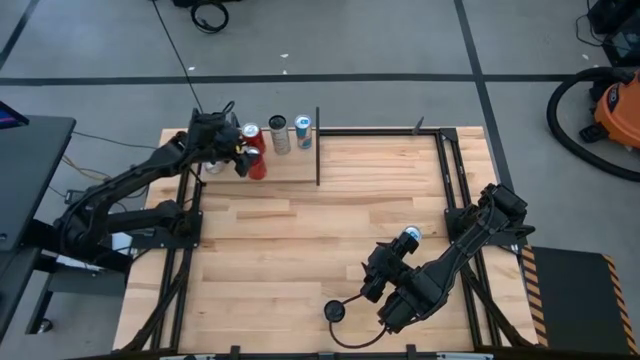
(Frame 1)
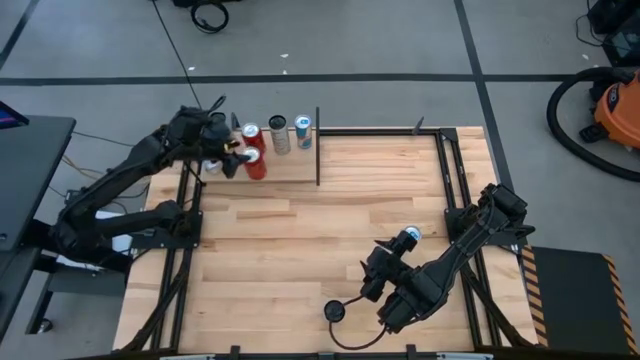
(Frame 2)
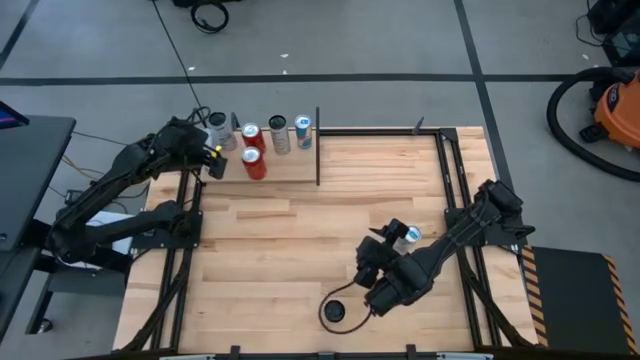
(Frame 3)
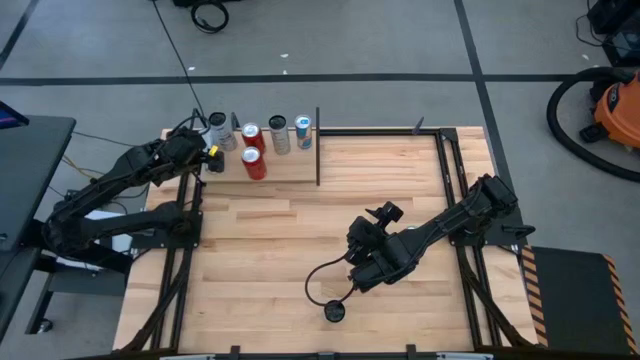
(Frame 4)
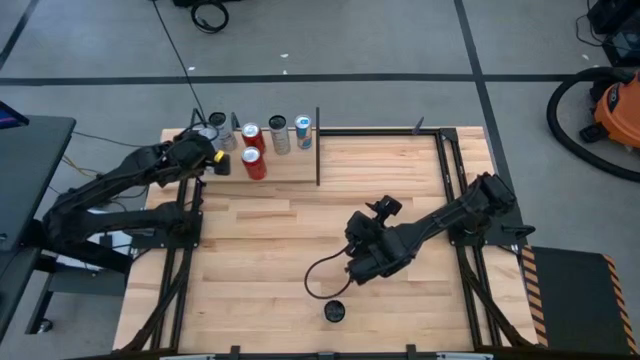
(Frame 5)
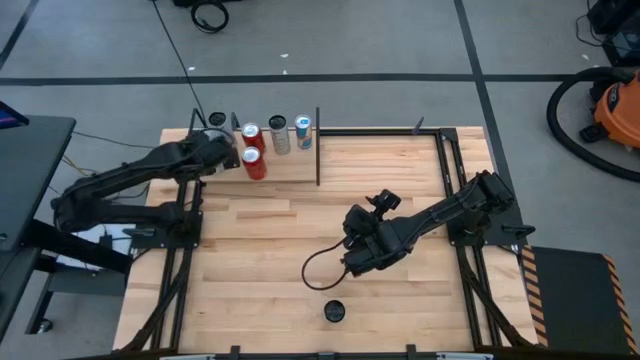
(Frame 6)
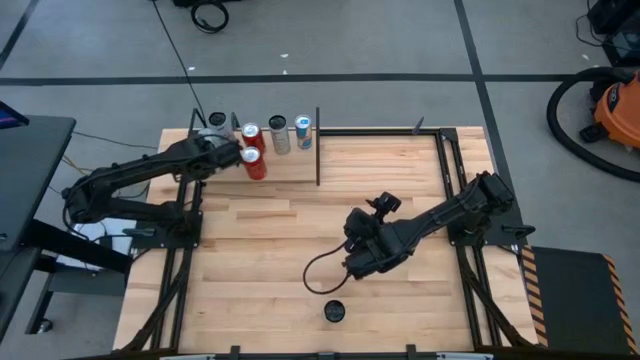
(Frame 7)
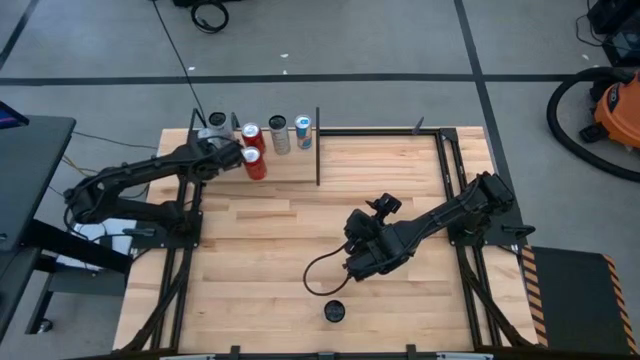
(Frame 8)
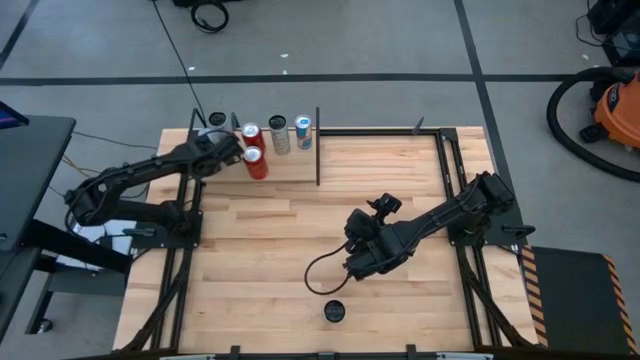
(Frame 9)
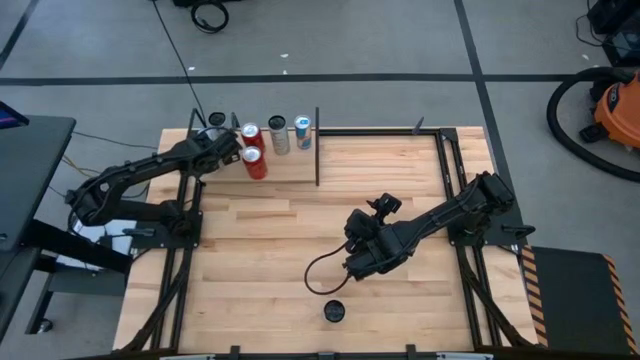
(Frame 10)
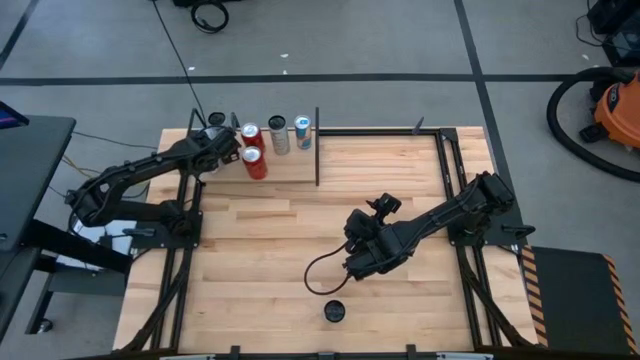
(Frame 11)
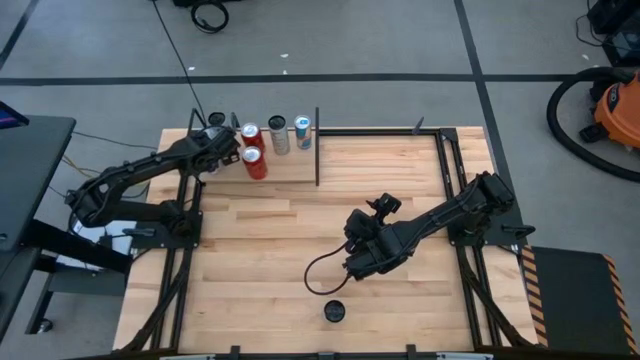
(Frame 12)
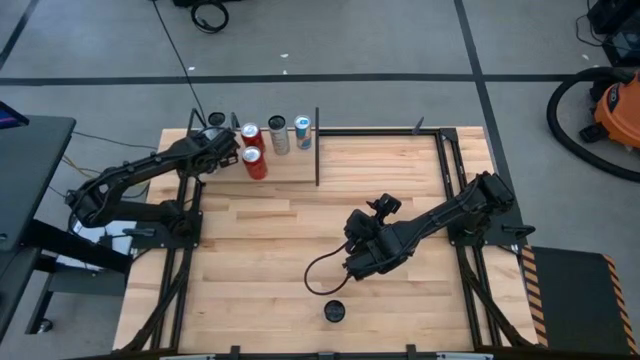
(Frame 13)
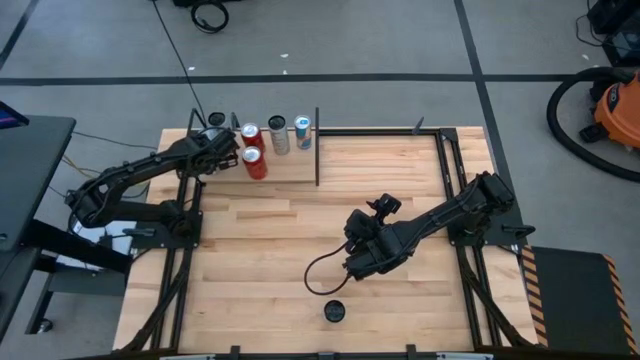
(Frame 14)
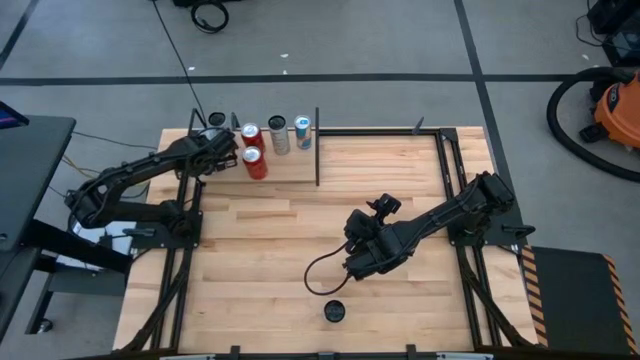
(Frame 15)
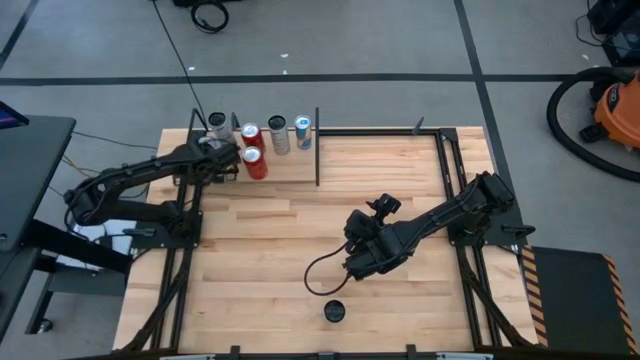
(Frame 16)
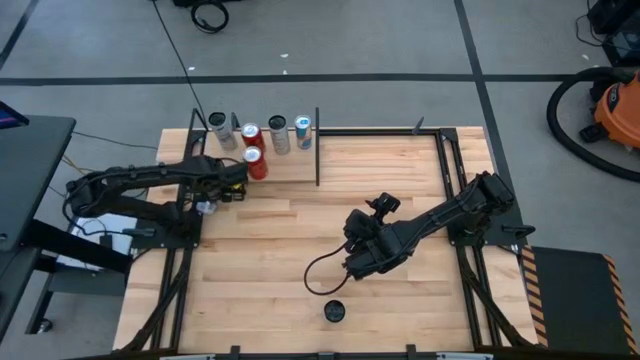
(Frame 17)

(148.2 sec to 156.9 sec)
Task: Place canned beverage on shelf
Adjust the blue-white soda can

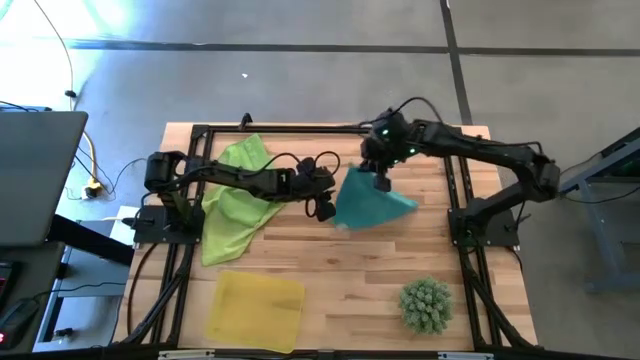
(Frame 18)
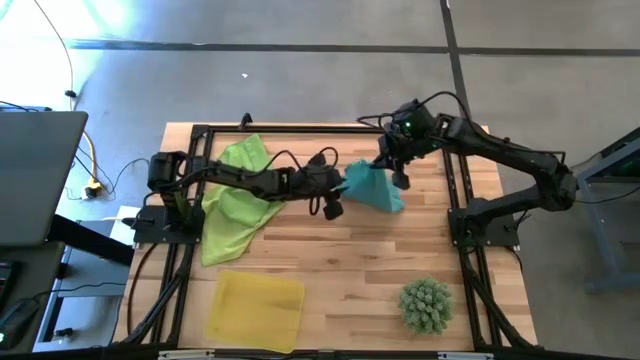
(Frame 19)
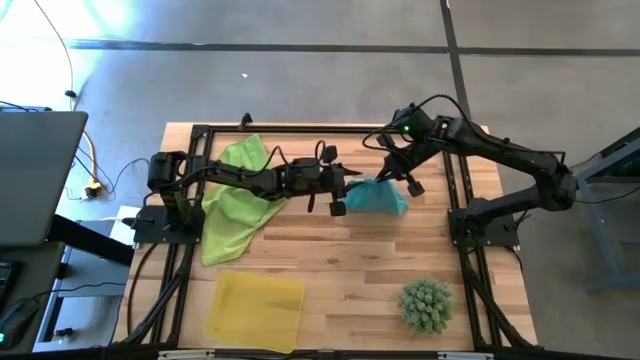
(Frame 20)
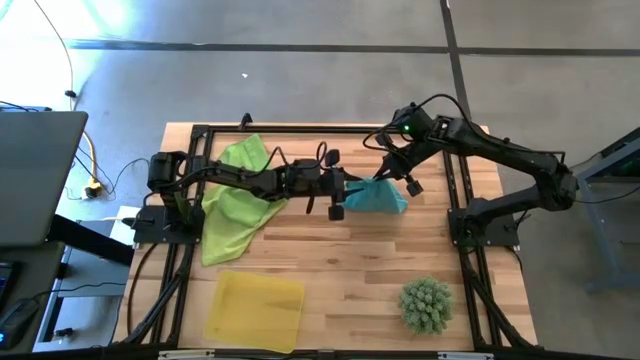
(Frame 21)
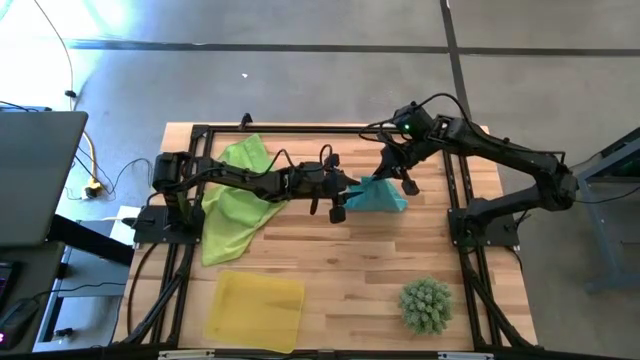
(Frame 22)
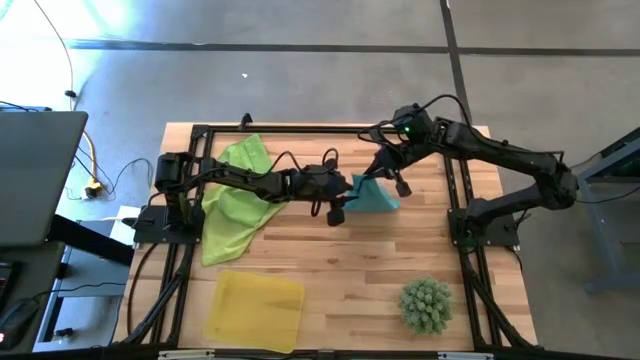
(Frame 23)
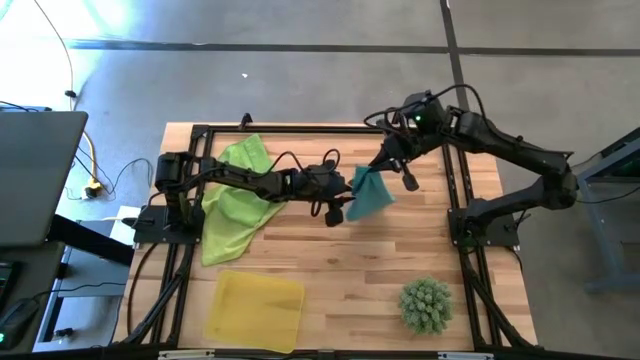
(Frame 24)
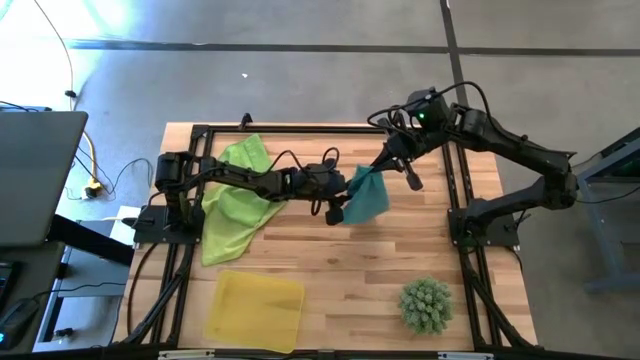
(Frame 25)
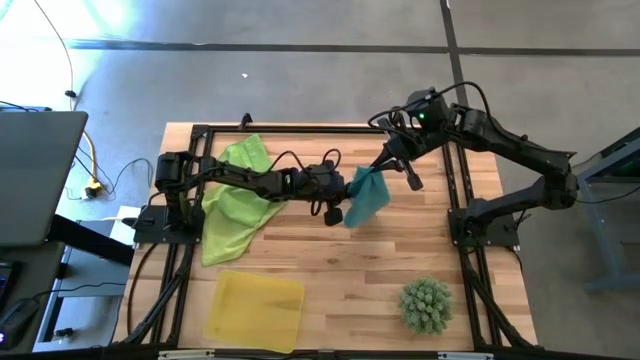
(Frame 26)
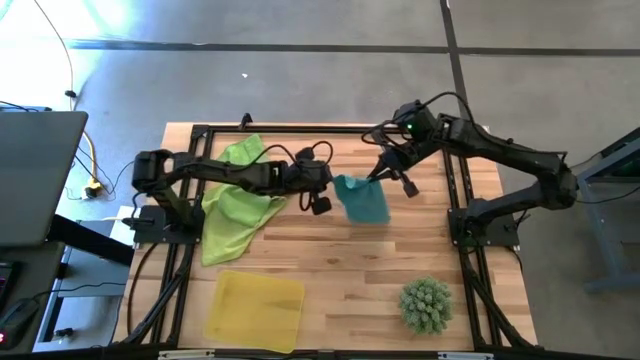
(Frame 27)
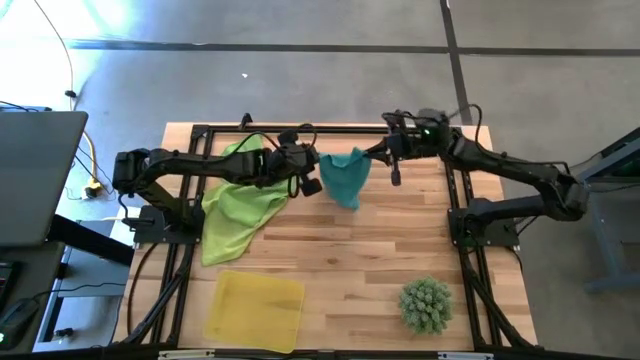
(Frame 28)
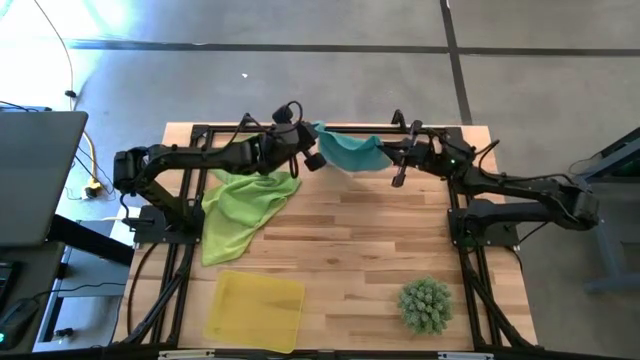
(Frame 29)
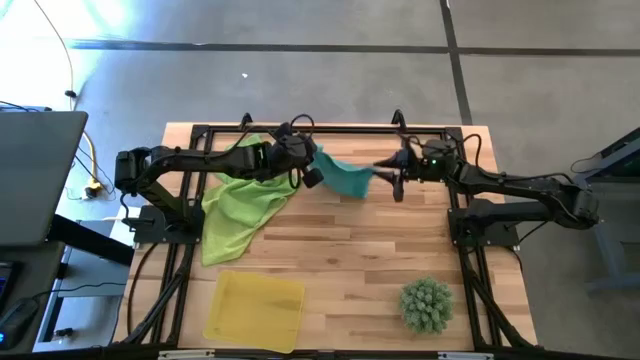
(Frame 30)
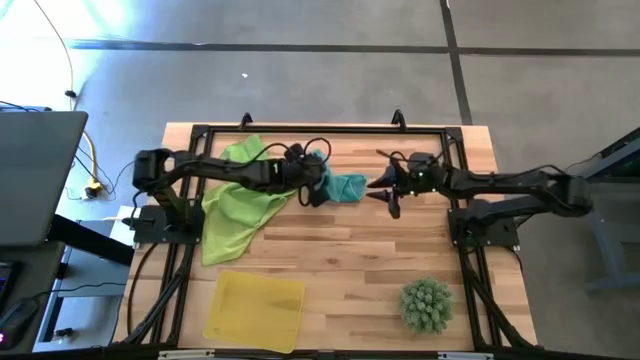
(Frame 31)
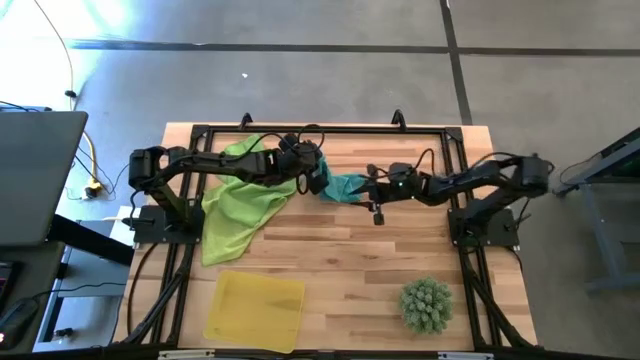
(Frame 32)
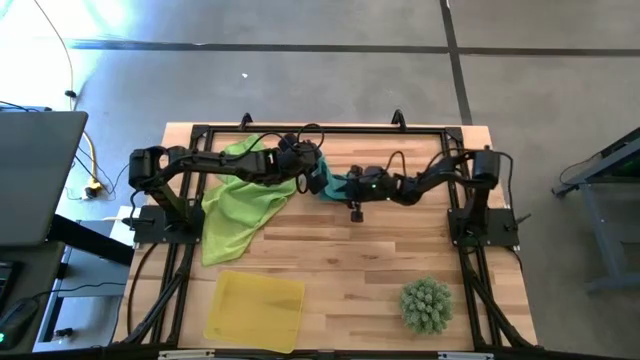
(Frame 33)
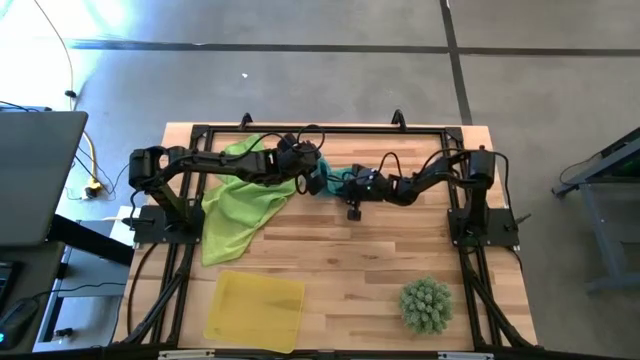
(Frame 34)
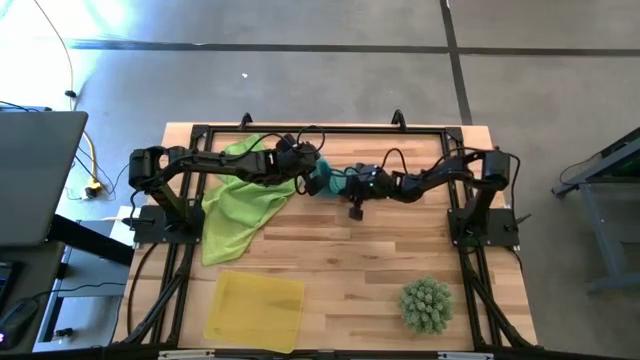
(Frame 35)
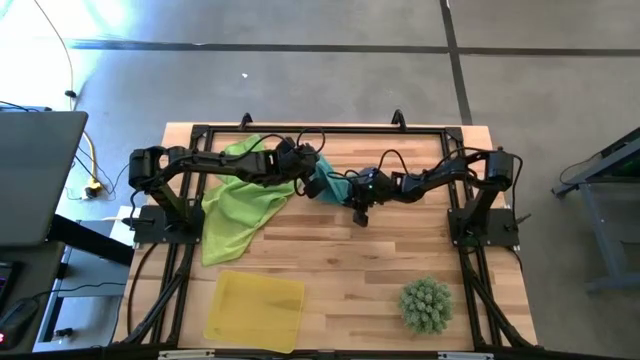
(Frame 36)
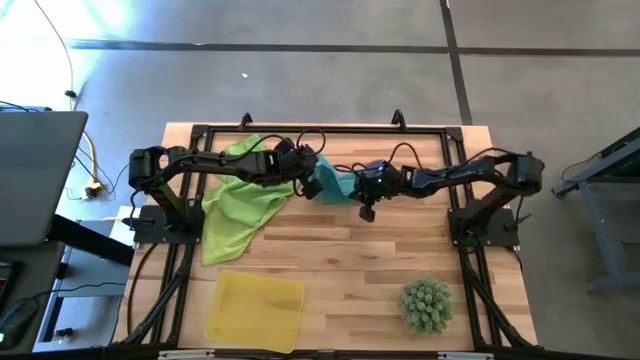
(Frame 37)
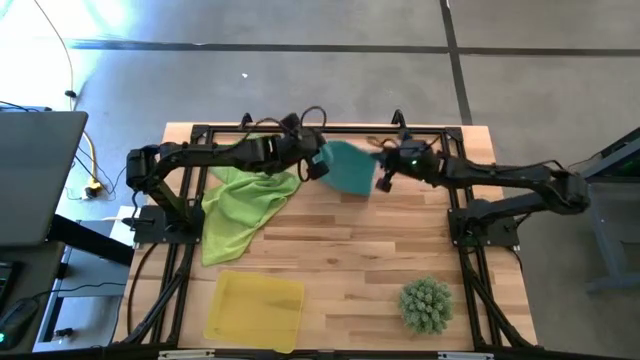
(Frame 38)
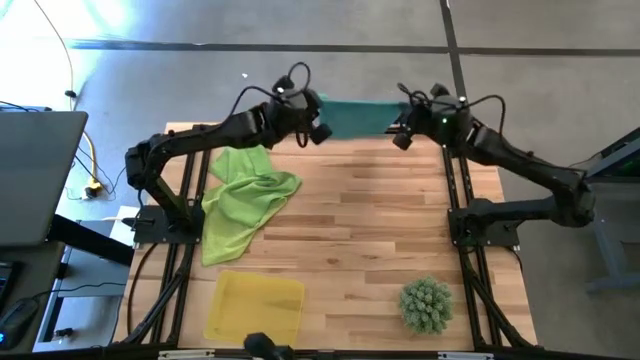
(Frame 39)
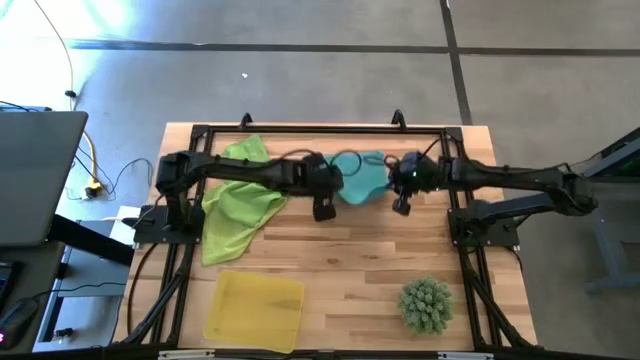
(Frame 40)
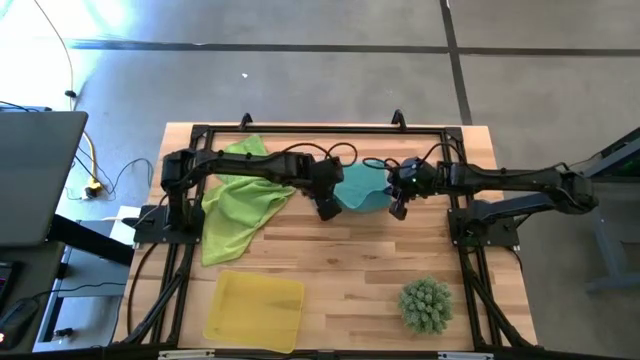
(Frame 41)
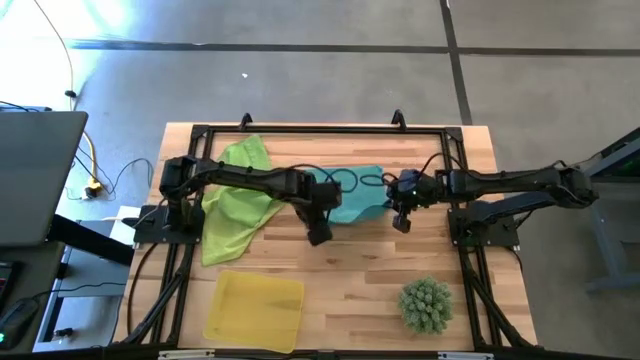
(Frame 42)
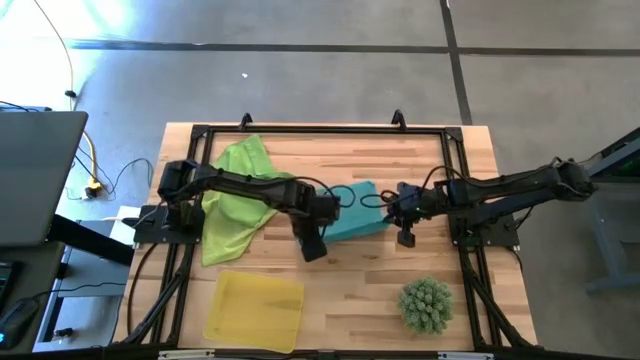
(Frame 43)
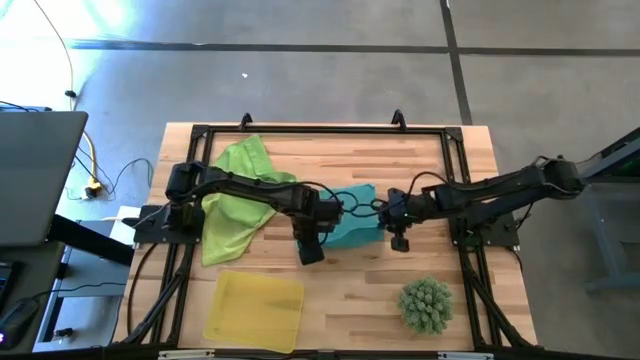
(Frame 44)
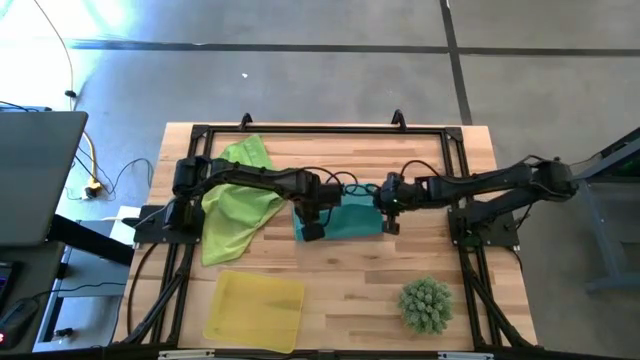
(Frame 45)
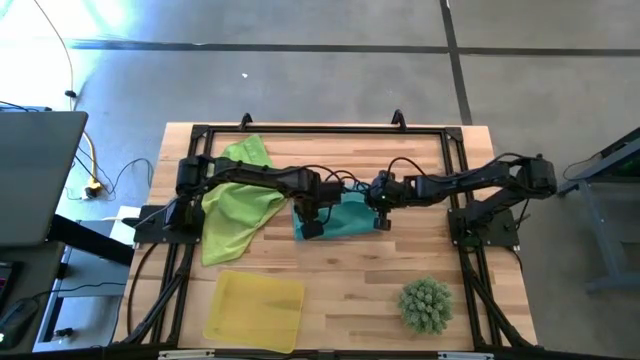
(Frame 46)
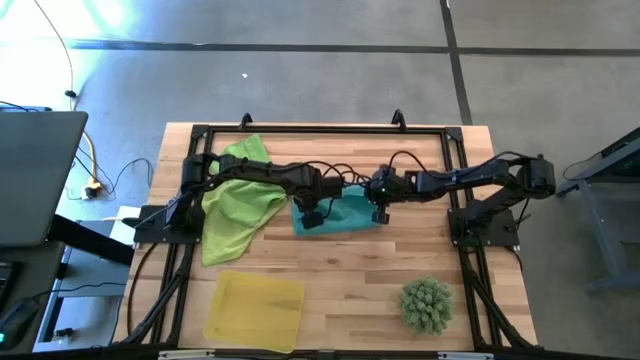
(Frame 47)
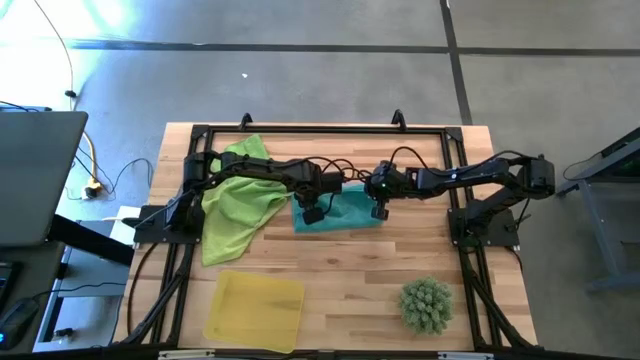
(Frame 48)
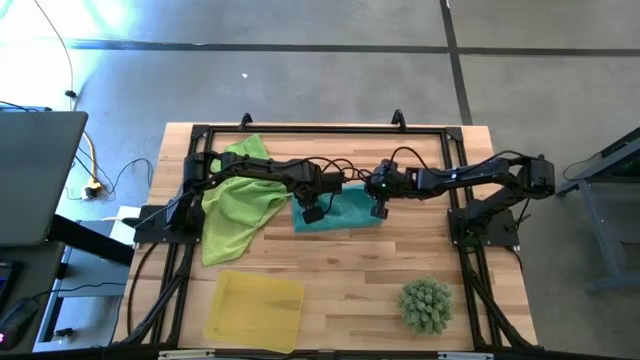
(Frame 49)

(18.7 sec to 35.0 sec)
Task: Roll microfiber towels into tight, uniform cylinder then place into a basket
Fold the blue microfiber towel
